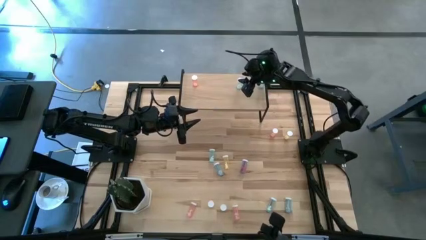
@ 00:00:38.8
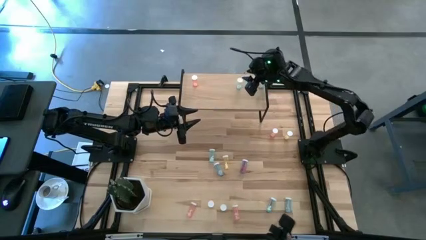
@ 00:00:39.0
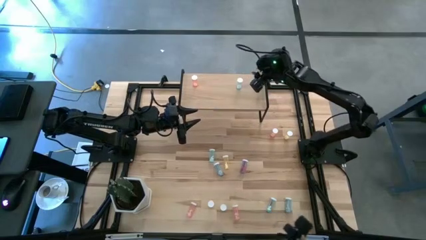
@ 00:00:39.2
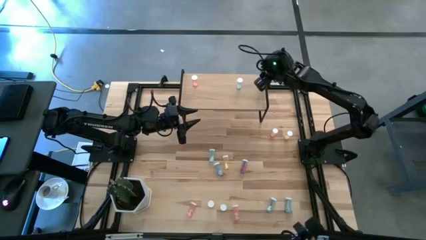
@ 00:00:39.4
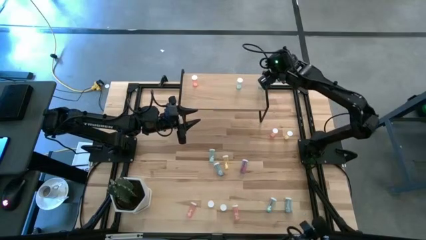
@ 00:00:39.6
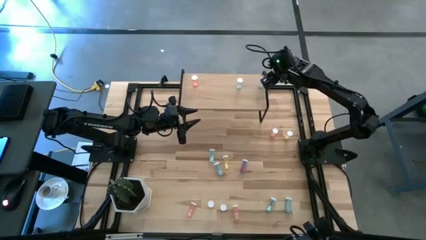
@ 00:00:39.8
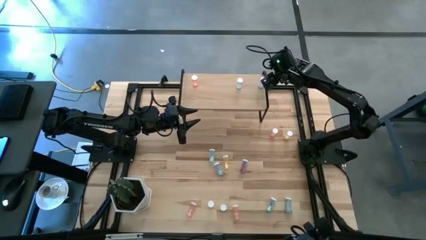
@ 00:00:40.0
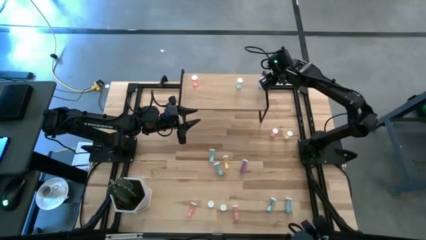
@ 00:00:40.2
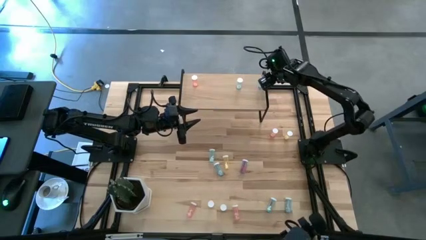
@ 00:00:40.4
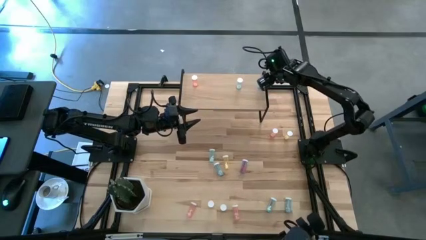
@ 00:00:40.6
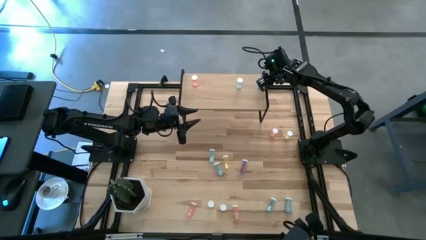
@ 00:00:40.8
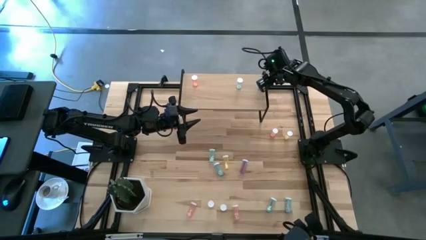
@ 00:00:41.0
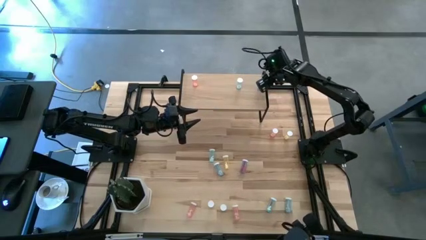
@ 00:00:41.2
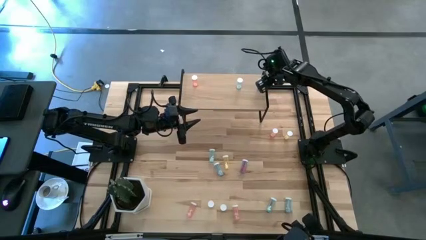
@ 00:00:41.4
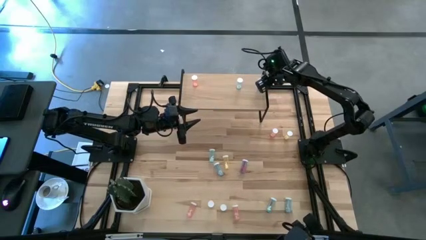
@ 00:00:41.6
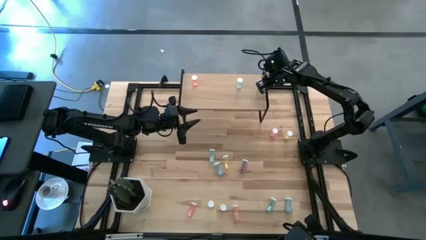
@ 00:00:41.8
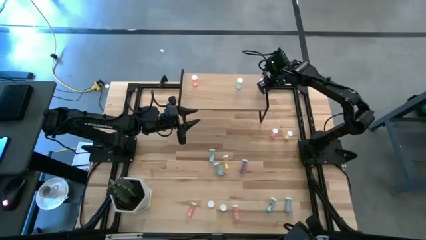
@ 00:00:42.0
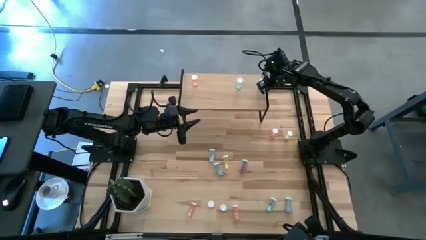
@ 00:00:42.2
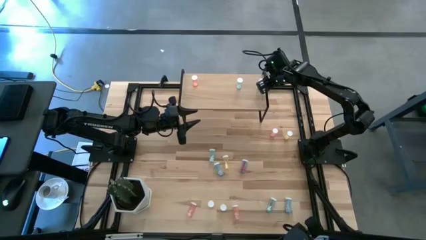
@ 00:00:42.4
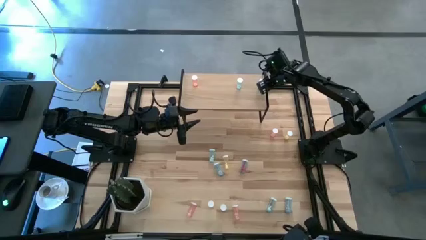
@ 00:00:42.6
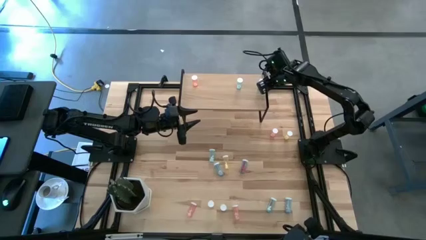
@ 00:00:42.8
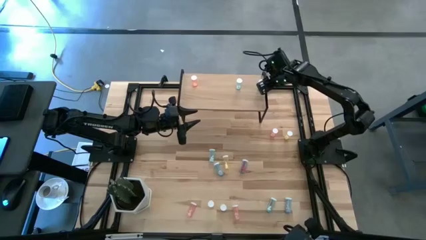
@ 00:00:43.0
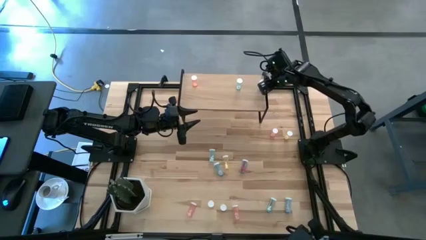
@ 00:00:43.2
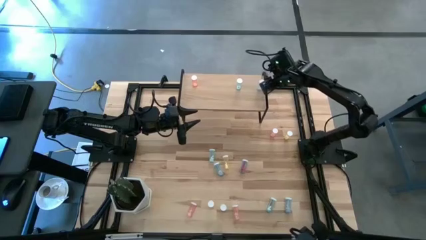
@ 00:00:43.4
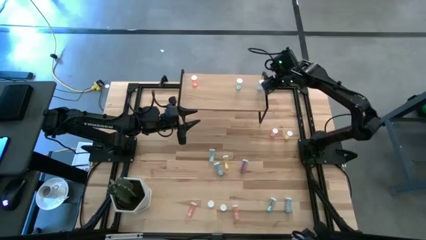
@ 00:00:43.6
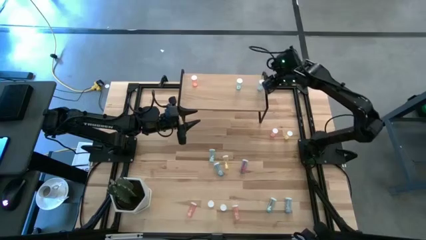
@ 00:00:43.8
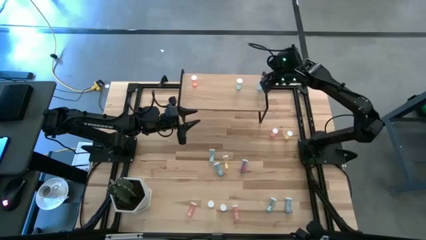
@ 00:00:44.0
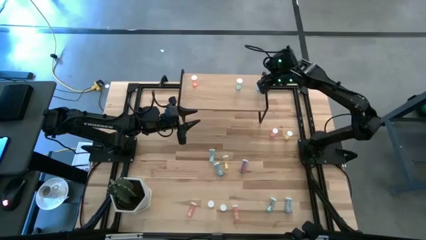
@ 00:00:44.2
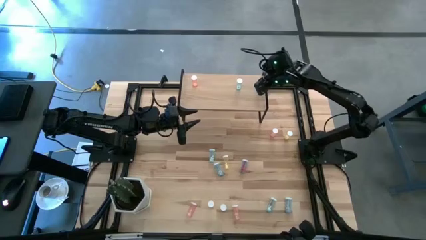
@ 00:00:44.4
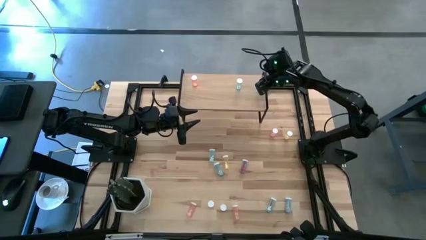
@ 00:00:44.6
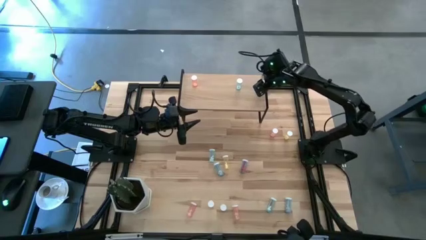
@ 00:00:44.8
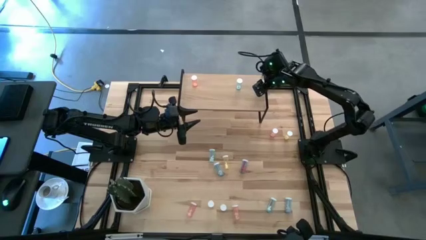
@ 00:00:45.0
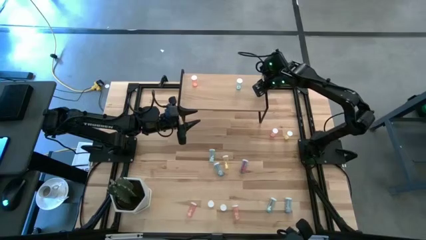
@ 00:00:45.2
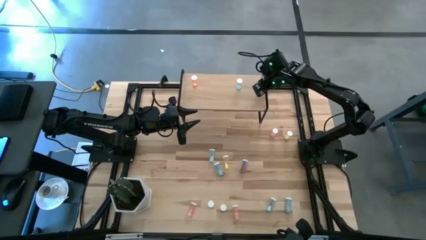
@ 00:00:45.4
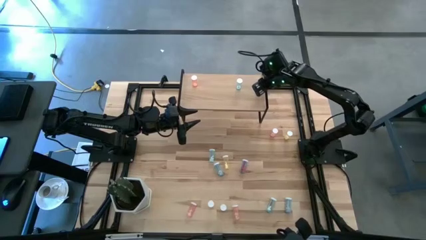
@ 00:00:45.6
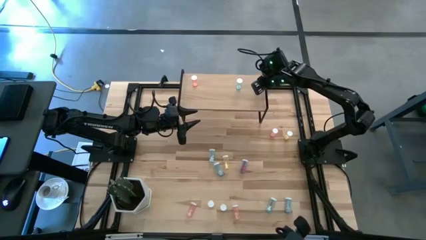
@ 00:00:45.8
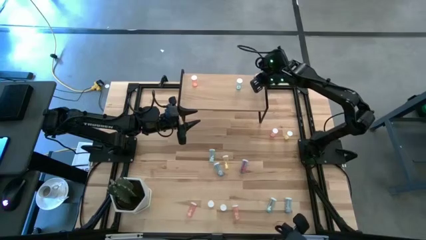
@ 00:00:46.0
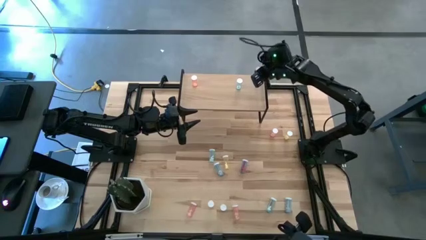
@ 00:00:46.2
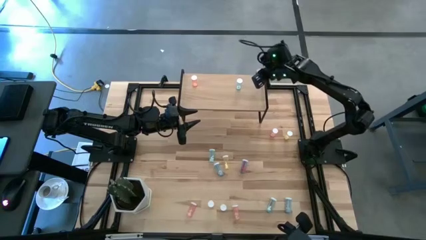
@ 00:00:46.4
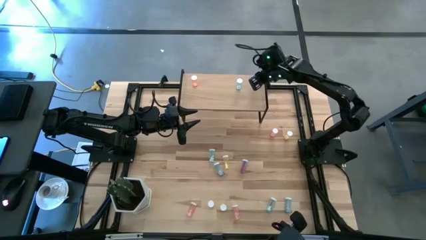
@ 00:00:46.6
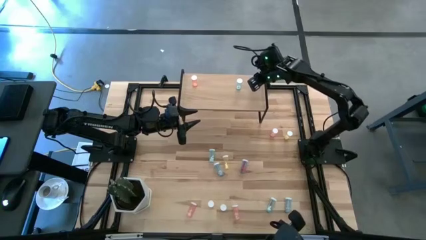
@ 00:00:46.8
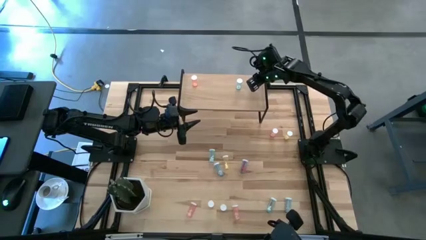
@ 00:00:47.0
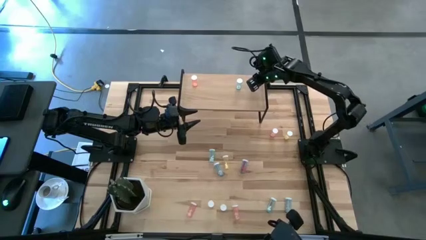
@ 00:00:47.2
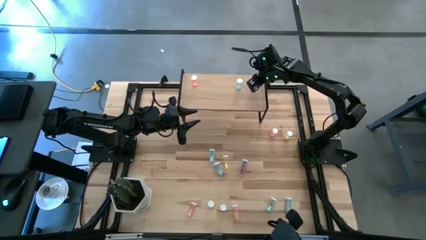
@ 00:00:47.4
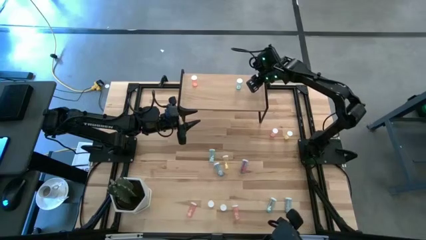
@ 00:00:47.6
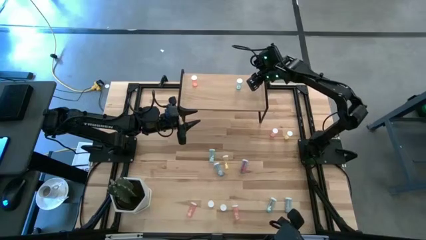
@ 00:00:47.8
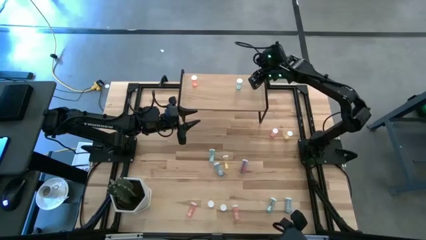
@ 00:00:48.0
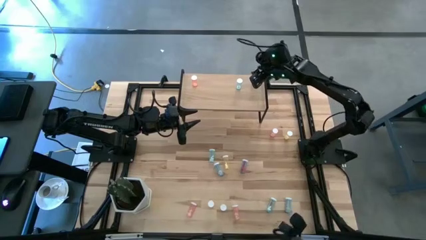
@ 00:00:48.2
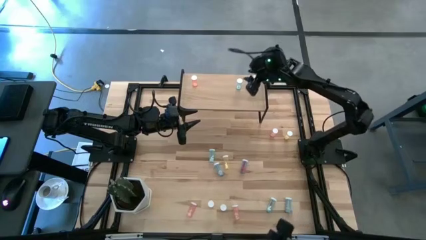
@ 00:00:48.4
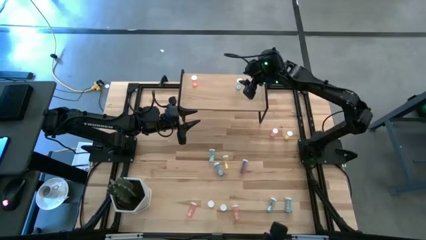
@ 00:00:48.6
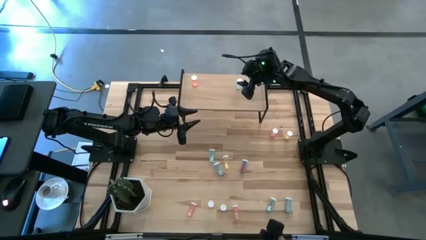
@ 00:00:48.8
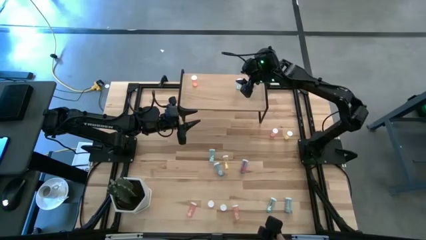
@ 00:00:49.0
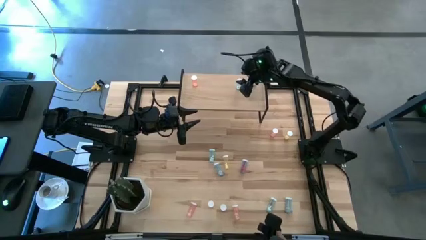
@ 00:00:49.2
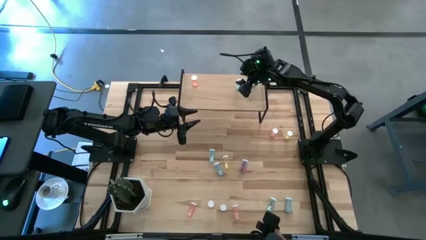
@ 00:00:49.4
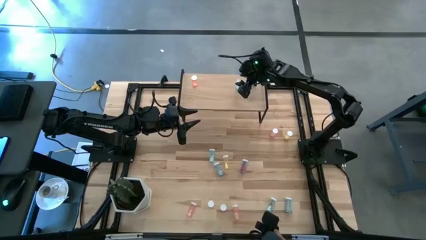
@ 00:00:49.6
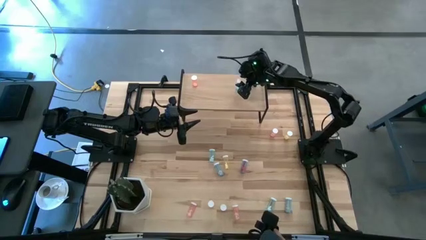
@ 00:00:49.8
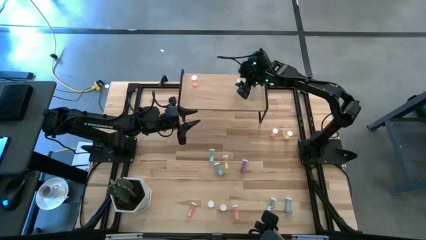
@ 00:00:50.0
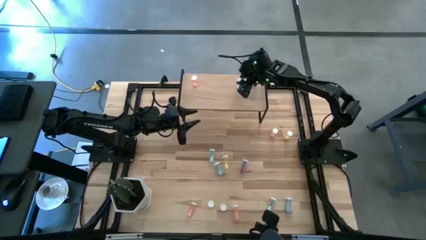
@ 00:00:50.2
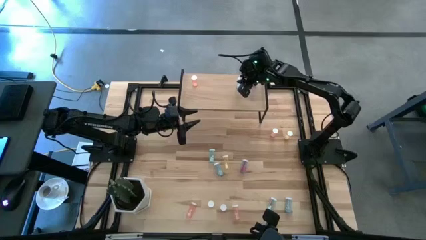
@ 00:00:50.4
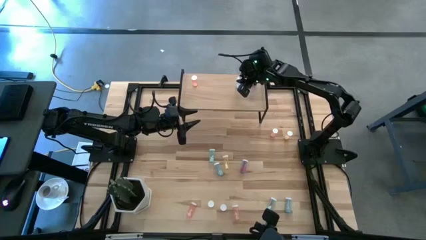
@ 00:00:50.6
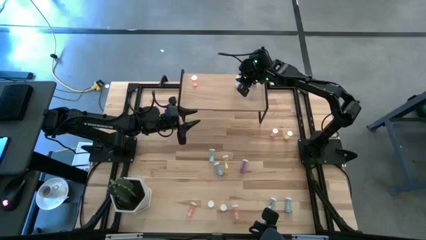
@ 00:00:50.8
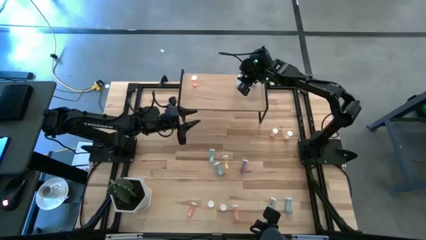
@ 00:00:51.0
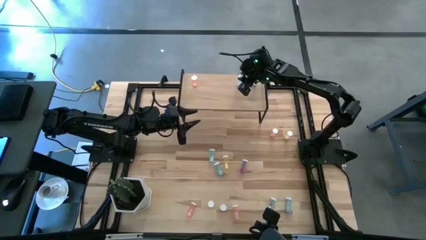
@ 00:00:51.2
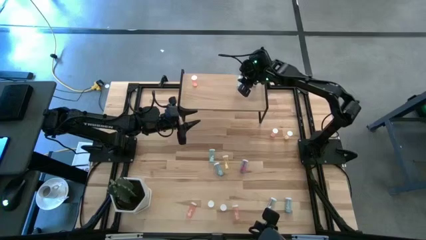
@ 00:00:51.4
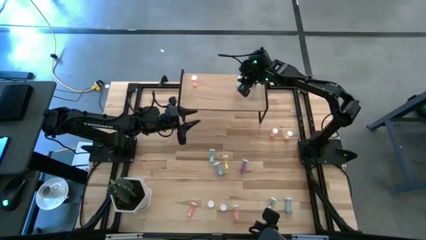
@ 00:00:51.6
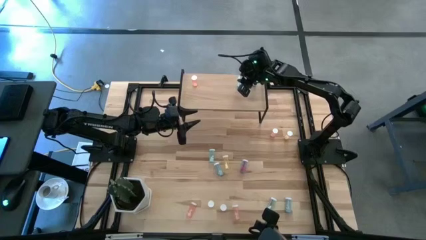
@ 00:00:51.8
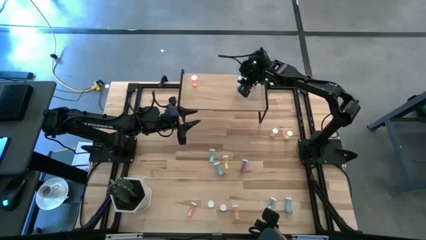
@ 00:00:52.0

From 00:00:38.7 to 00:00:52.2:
Task: Pick and place medicine bottles onto shelf by color
Adjust the pill bottles on the shelf
